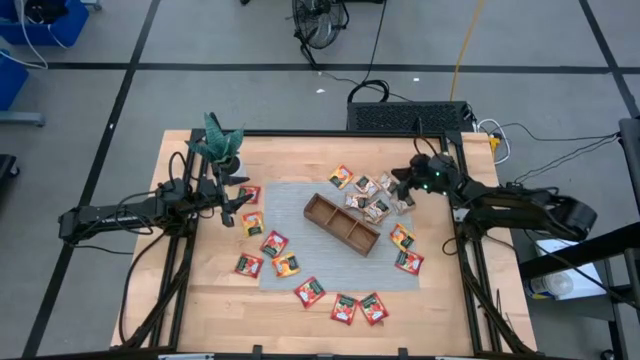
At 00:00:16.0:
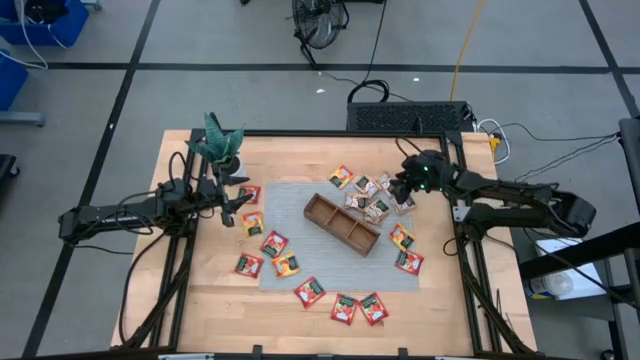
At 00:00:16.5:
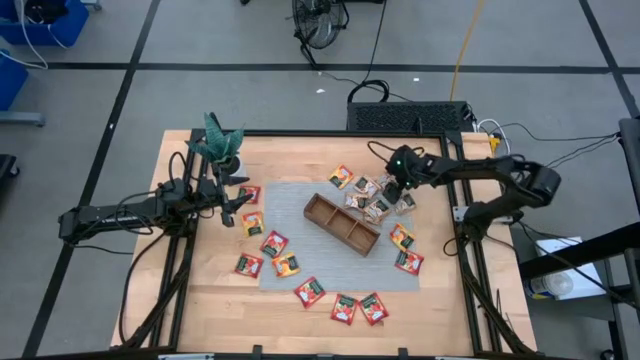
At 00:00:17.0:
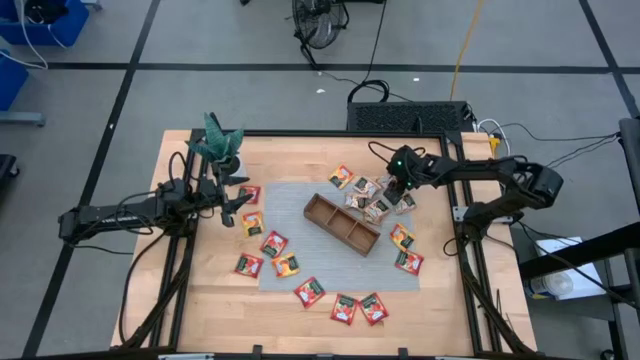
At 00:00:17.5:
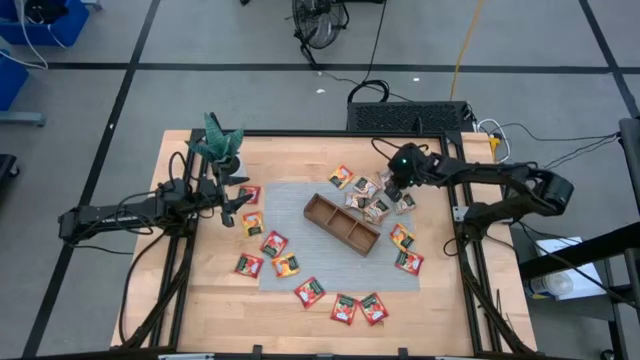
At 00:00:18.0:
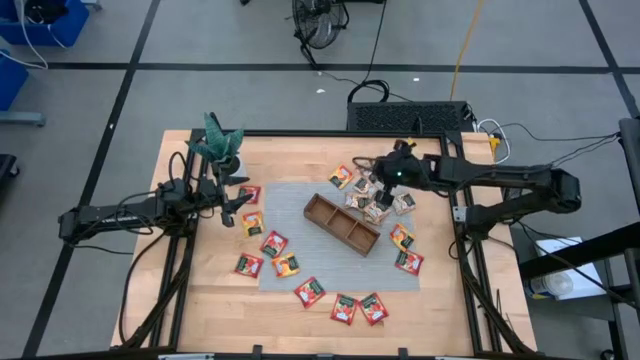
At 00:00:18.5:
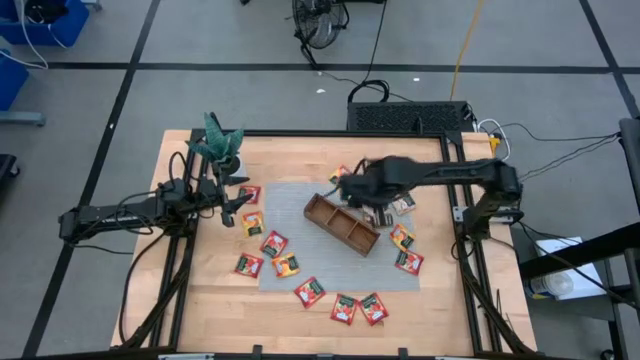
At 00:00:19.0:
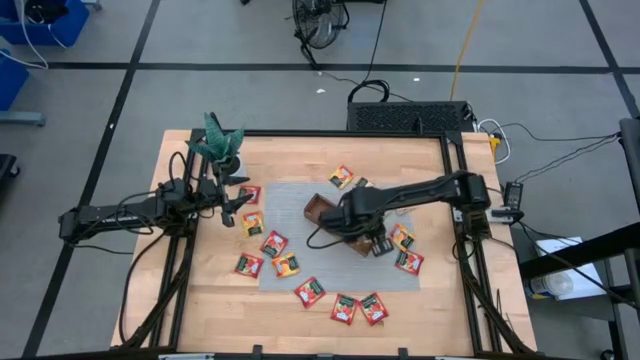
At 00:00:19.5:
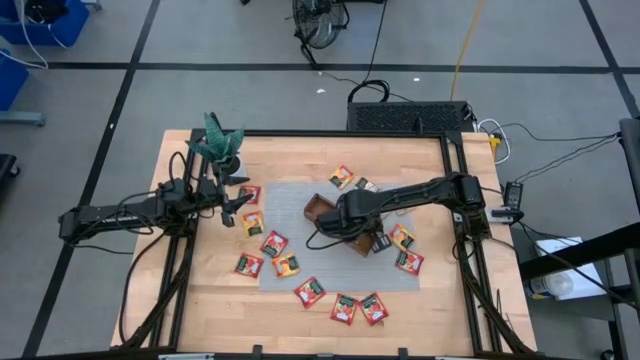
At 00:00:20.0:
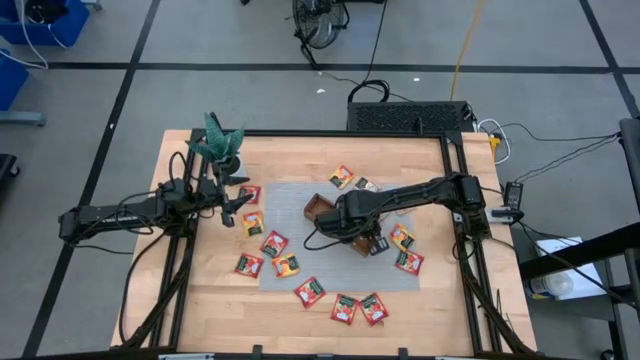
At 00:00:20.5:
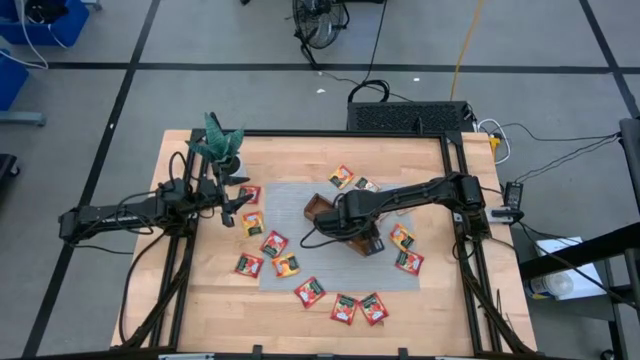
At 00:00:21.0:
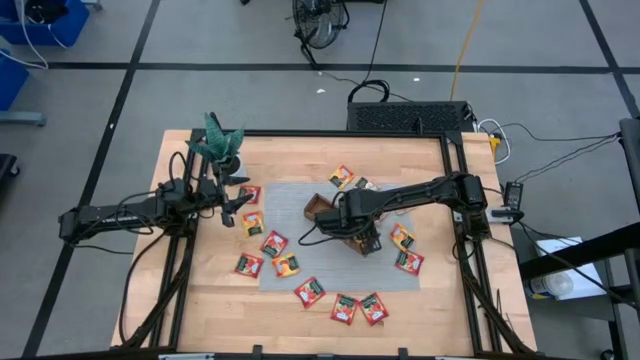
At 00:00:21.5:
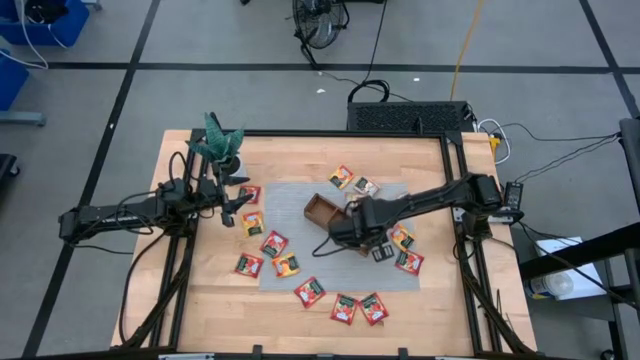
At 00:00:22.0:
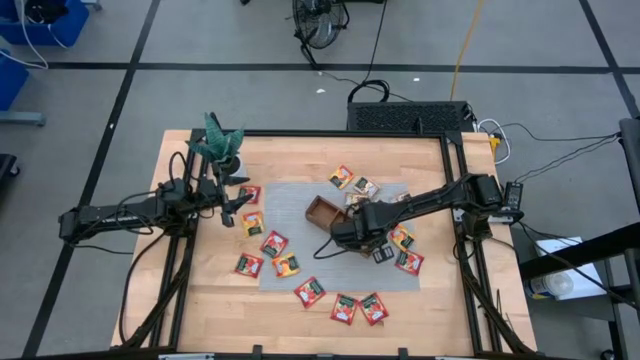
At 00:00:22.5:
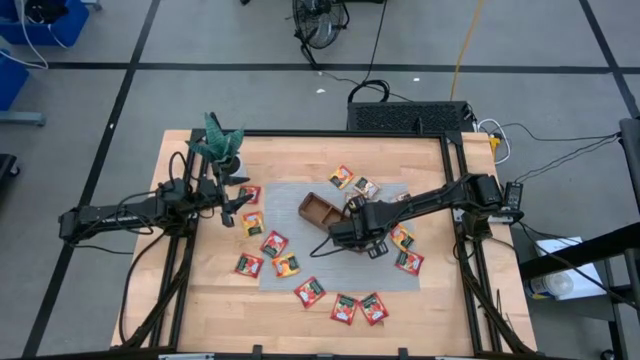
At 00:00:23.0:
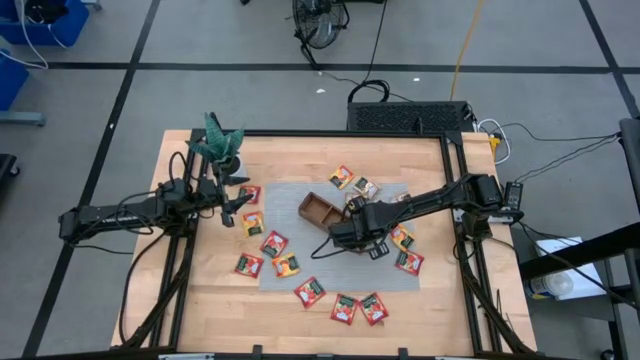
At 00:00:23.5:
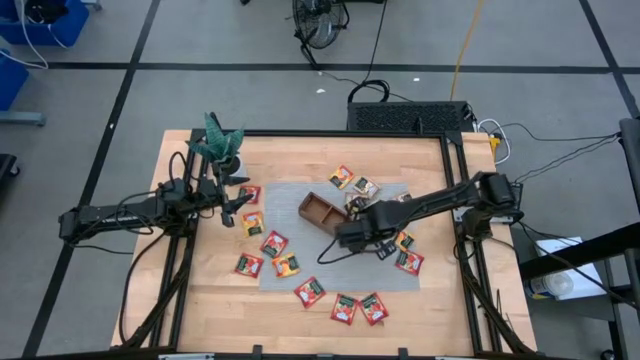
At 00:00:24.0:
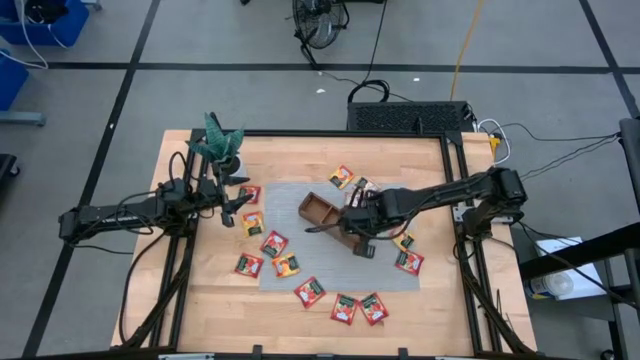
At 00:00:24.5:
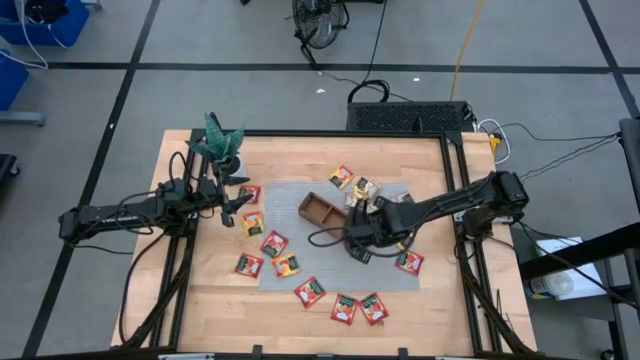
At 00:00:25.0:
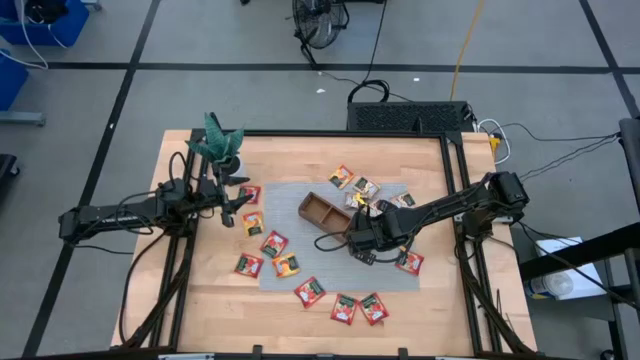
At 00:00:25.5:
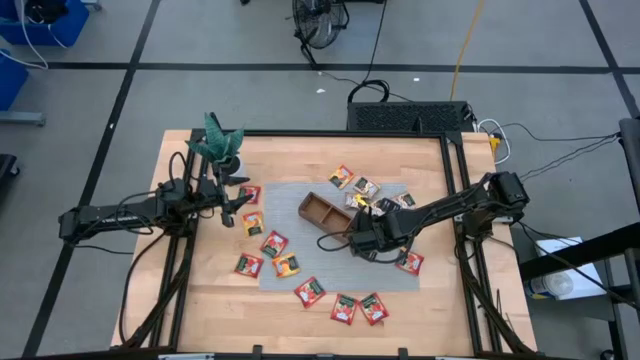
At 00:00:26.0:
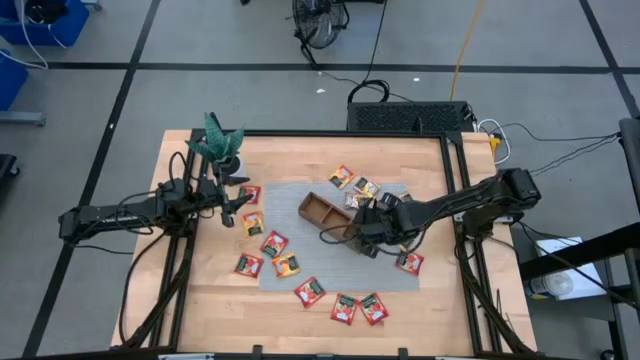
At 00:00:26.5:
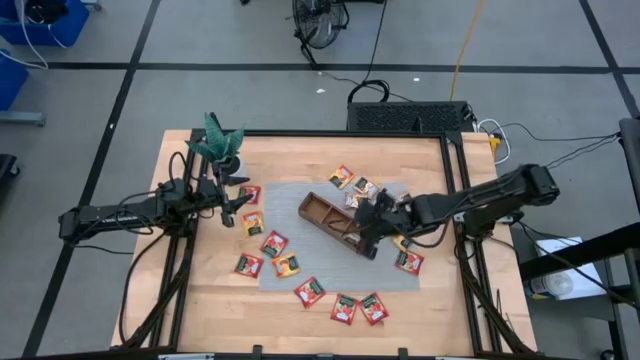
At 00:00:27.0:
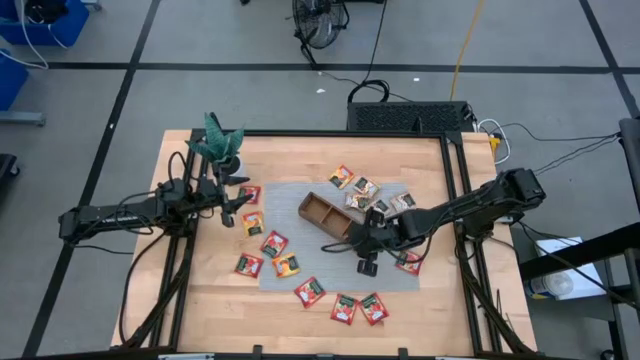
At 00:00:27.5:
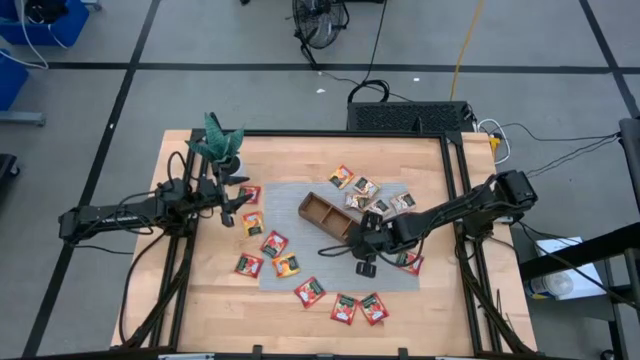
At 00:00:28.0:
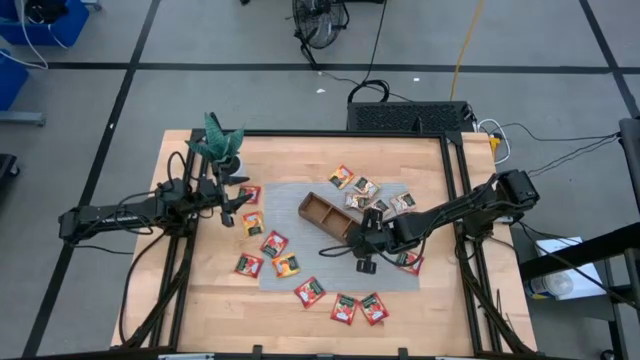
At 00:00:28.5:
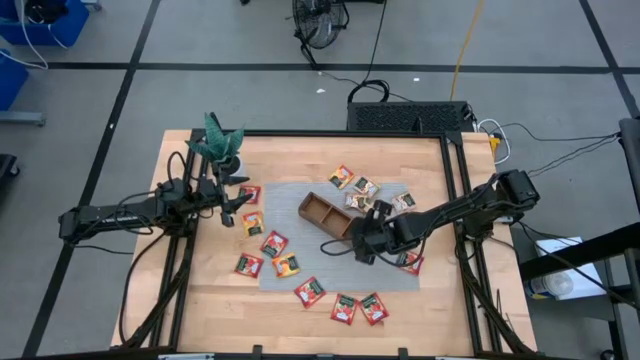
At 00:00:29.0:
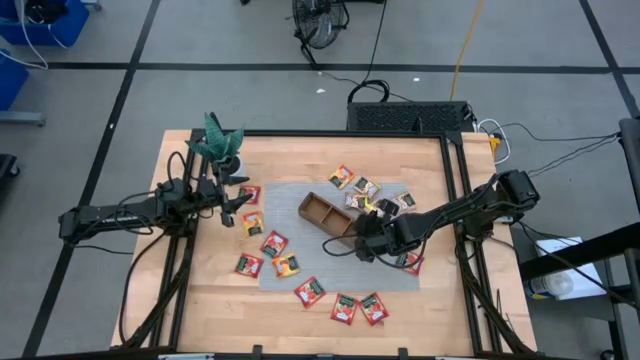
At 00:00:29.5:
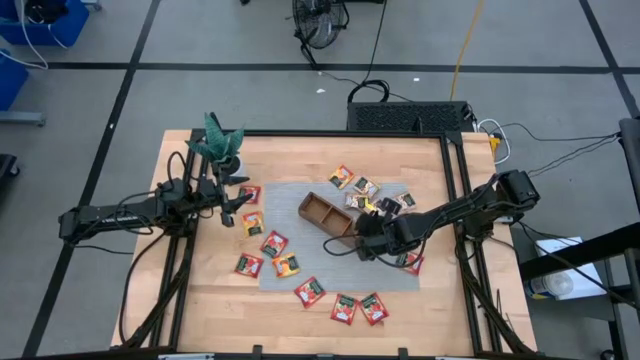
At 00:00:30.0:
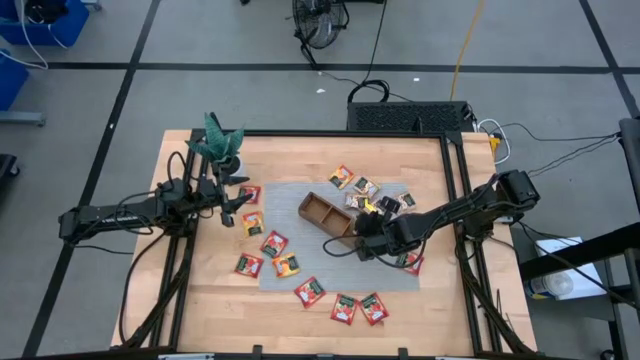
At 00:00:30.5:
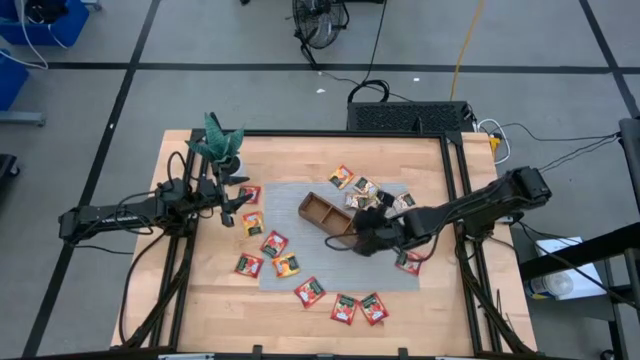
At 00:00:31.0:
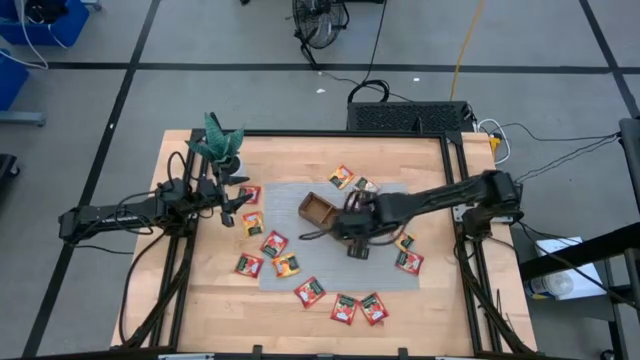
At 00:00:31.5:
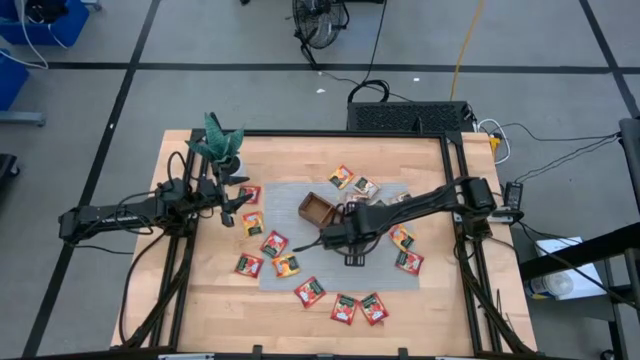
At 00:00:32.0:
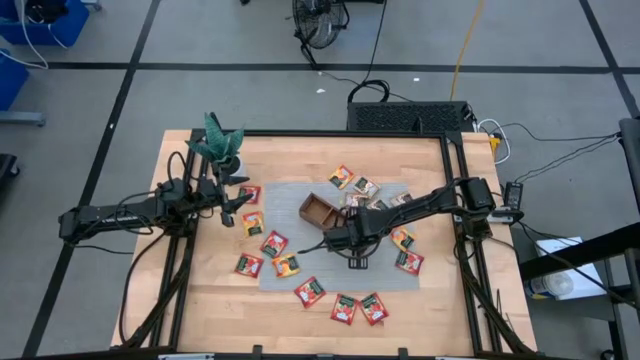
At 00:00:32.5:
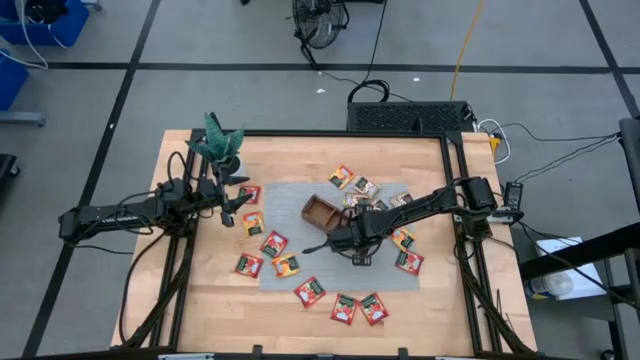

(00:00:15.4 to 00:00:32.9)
Task: Pick & Place Tea
Put the brown tea into the right part of the wooden organizer
